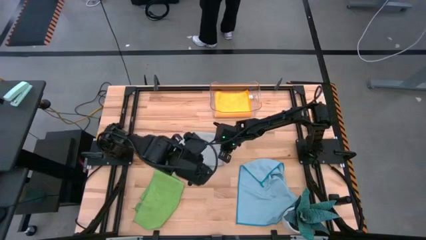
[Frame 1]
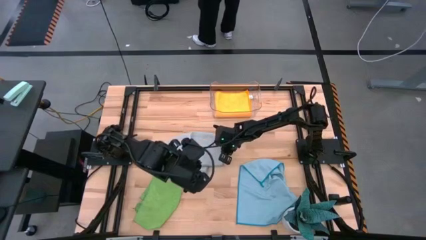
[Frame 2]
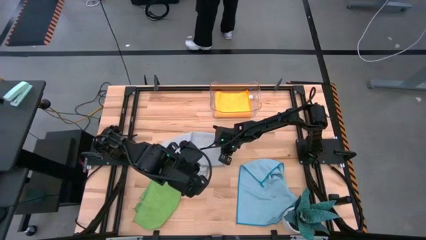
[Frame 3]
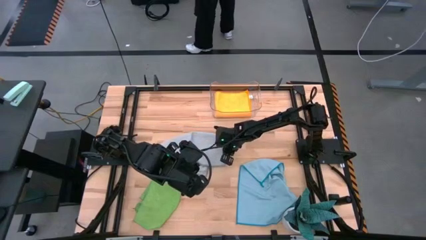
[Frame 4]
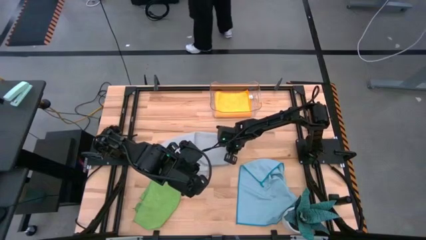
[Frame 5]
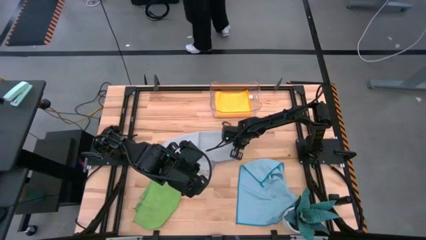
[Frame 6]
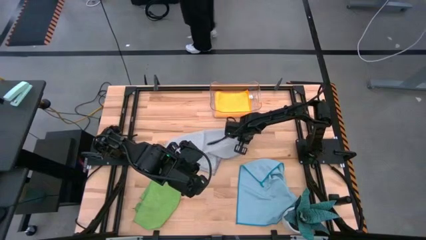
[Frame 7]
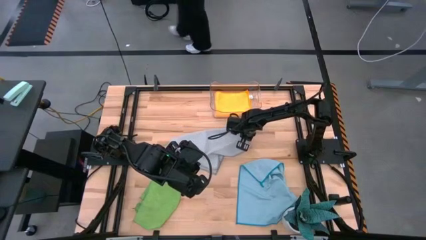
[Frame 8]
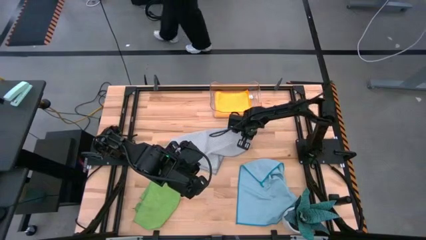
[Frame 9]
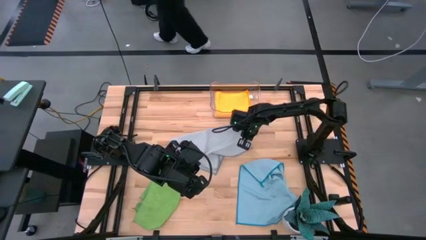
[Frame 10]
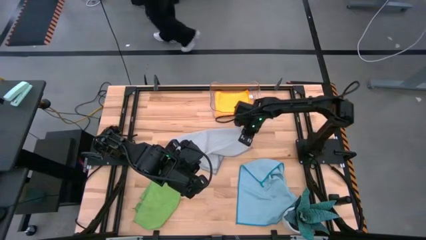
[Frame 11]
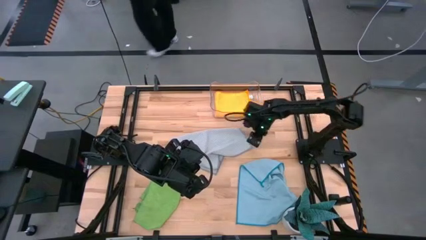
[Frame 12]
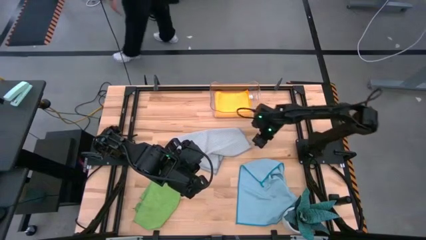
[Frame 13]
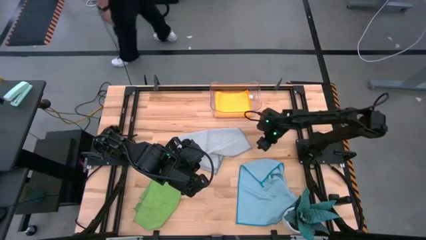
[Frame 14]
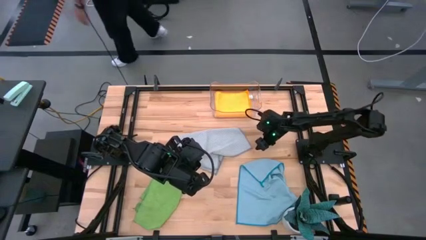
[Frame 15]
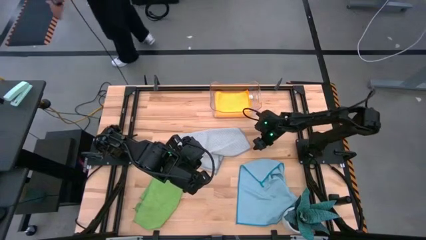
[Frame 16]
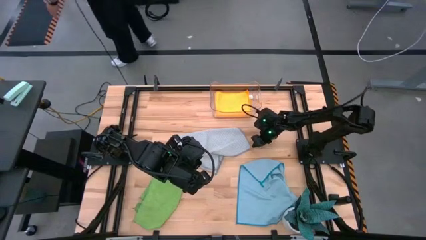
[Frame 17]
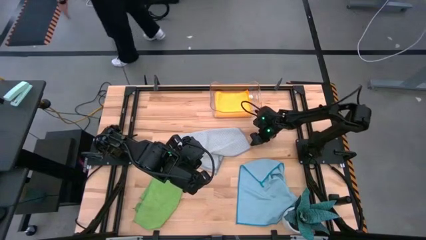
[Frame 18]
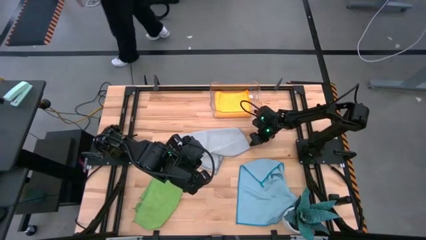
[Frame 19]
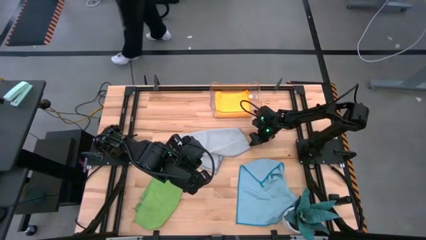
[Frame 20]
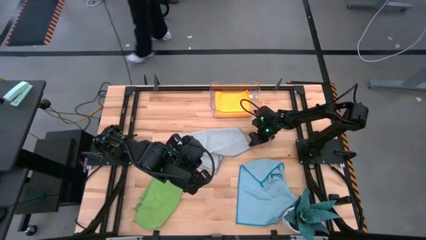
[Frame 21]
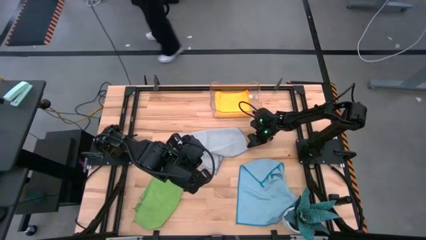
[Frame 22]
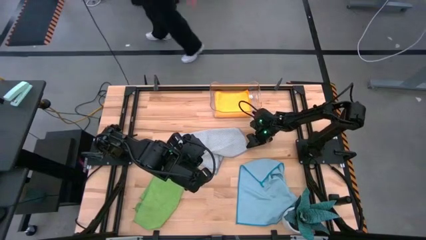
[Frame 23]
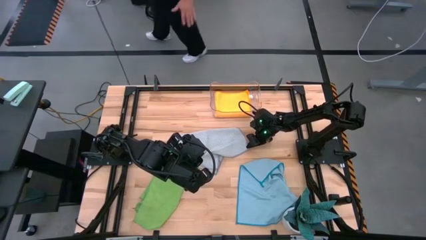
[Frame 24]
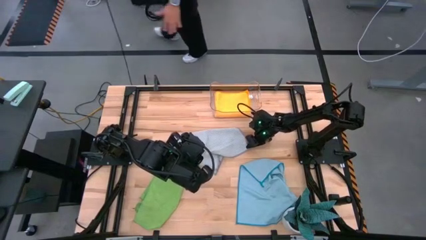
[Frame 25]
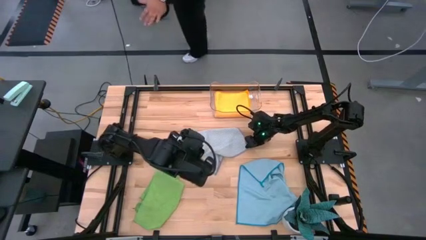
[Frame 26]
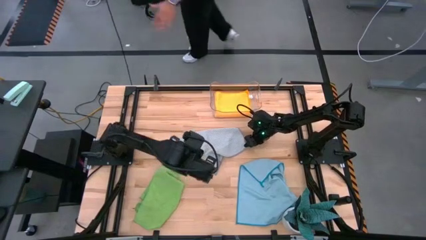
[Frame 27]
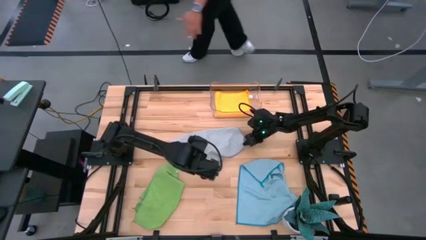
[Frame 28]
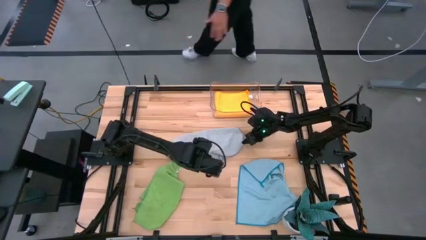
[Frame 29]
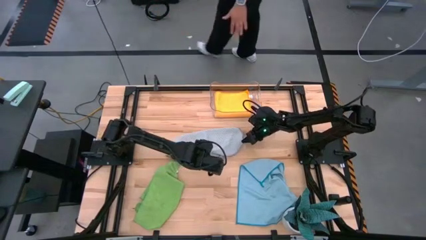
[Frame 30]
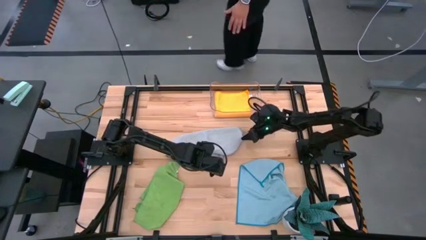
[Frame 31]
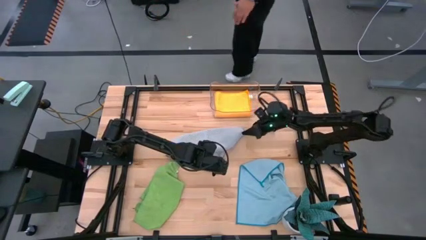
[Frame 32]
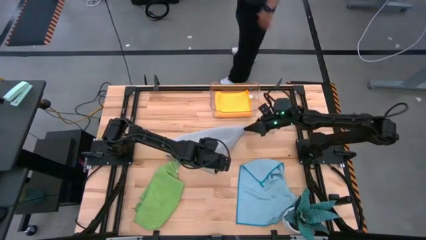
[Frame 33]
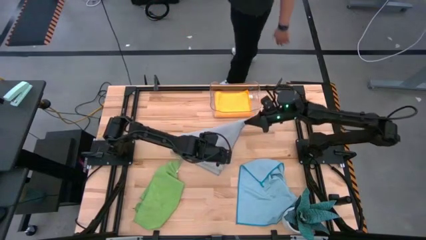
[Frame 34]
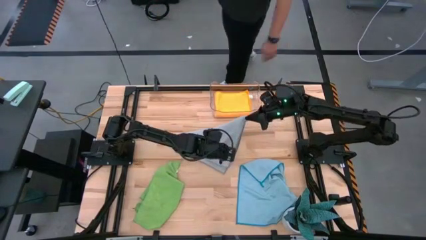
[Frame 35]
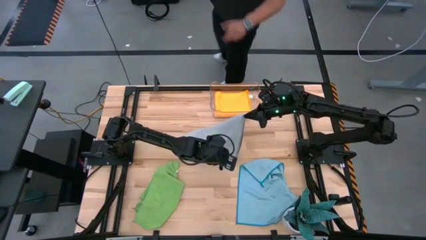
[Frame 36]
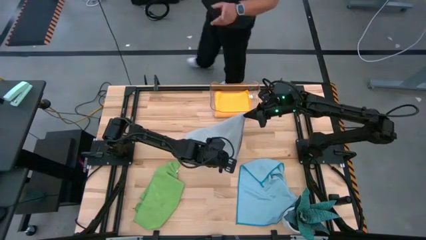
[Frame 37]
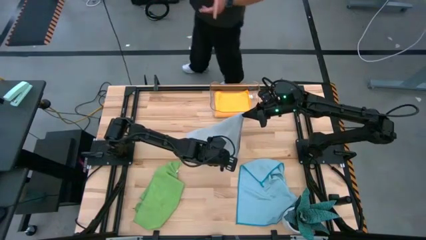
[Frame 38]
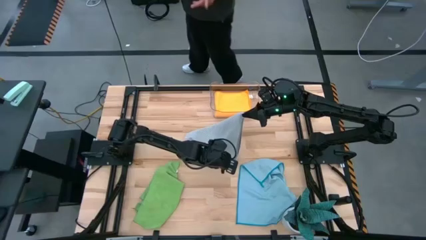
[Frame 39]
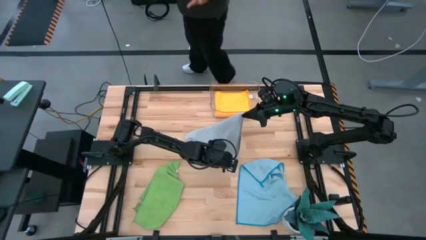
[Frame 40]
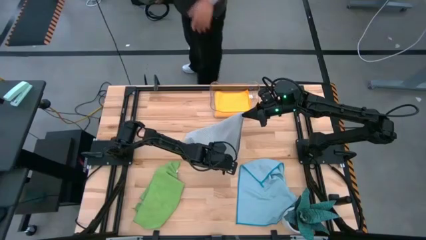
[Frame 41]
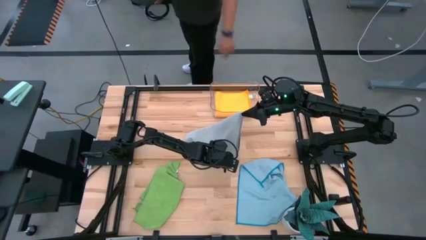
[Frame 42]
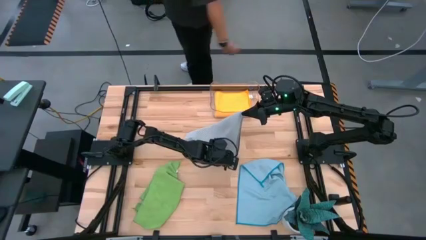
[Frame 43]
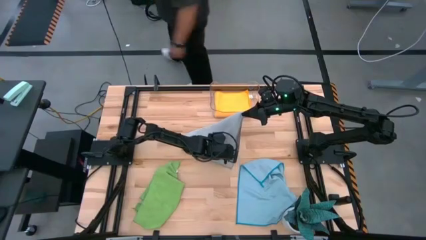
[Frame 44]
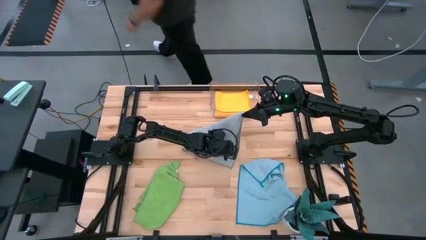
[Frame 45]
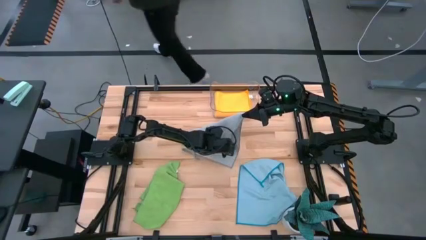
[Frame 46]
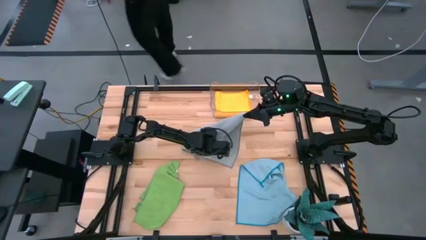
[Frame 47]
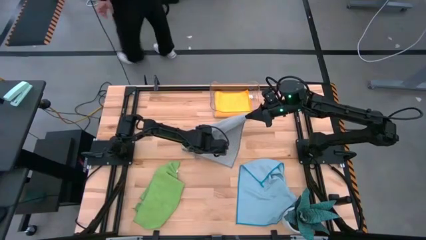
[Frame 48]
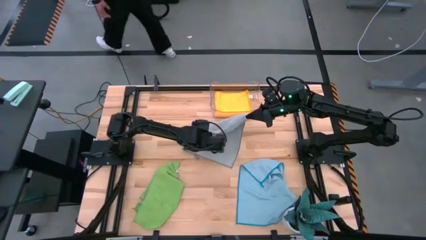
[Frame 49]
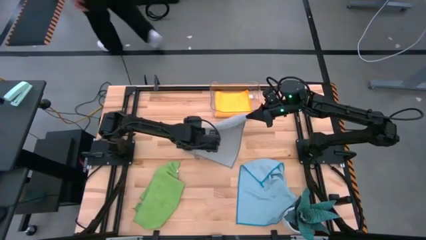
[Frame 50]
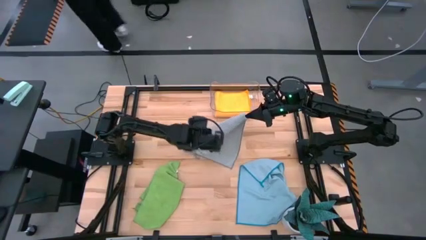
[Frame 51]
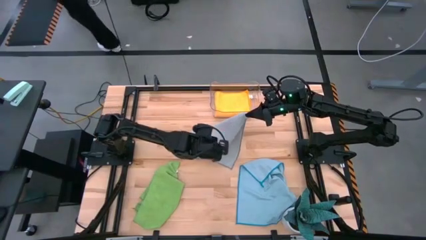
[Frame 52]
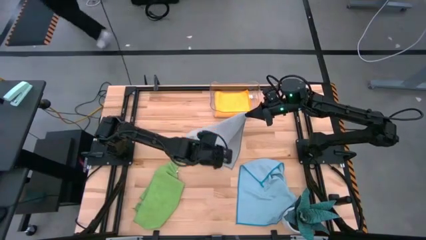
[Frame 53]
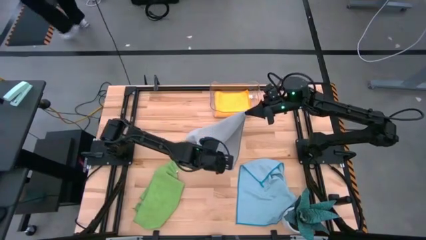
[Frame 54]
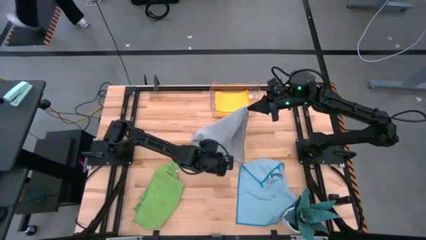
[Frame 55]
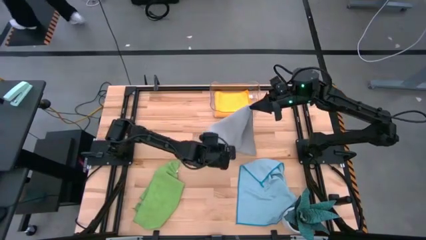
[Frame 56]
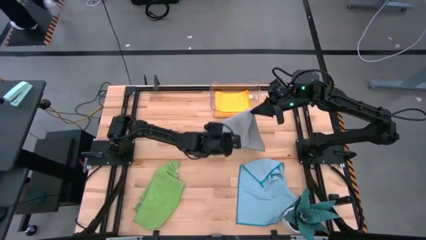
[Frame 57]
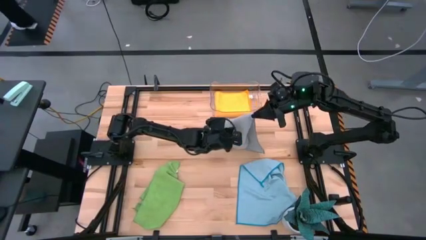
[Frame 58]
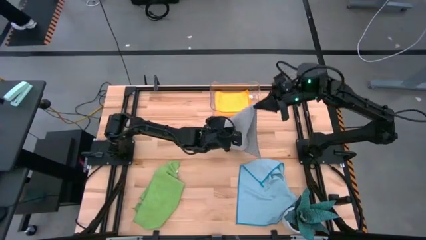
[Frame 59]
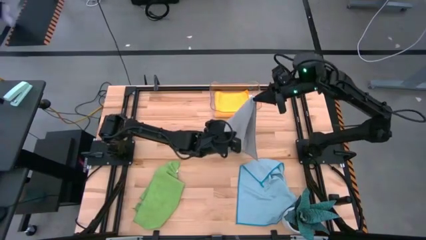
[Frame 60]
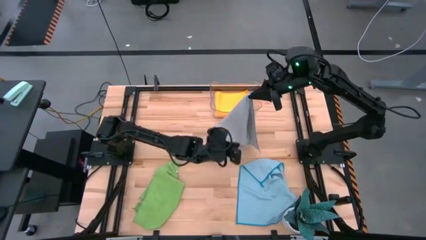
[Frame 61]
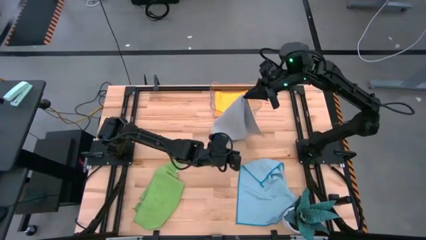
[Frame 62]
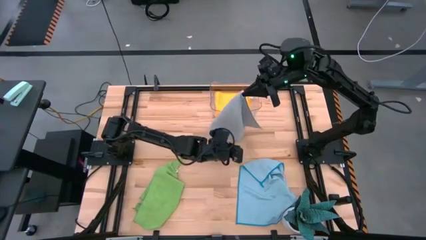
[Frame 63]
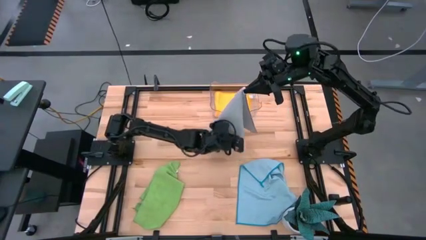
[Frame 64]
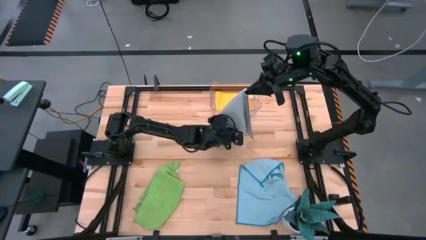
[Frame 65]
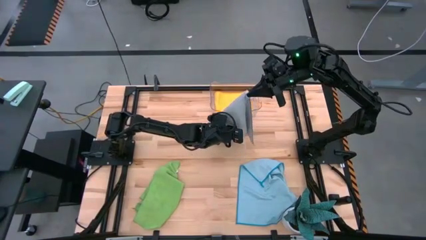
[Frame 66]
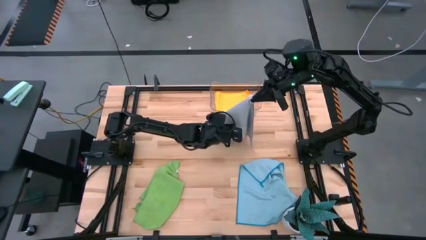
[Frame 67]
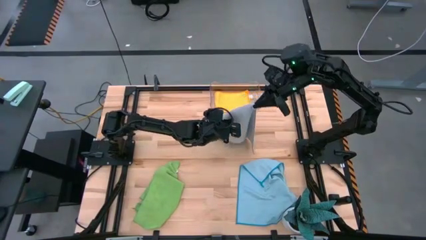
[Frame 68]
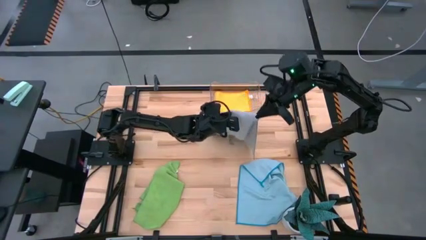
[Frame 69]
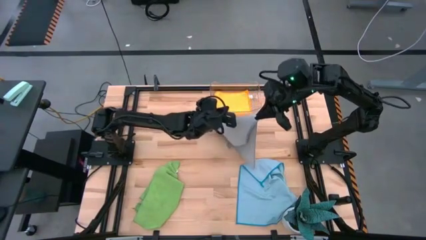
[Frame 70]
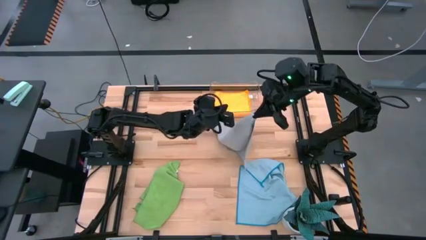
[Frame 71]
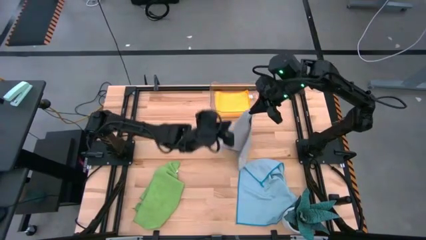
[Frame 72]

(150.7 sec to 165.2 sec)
Task: Fold microfiber towels
Fold the gray microfiber cloth

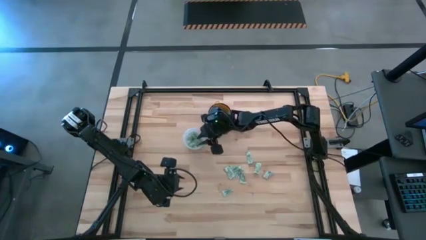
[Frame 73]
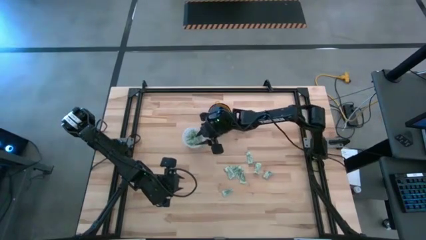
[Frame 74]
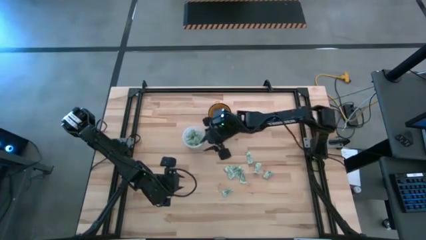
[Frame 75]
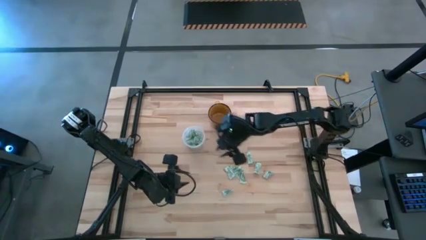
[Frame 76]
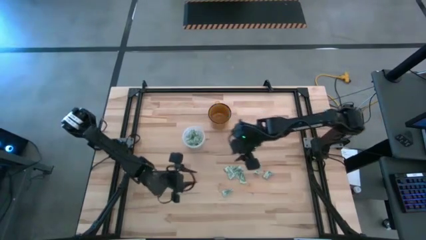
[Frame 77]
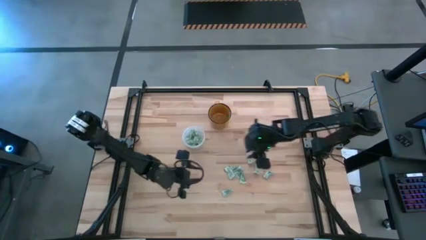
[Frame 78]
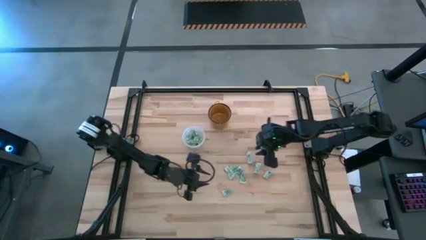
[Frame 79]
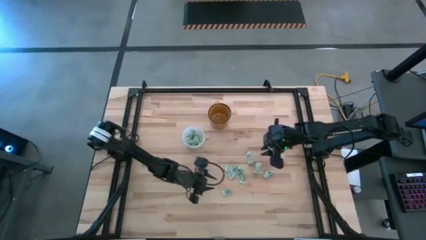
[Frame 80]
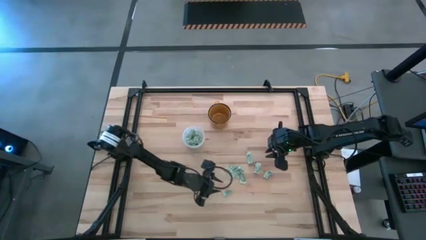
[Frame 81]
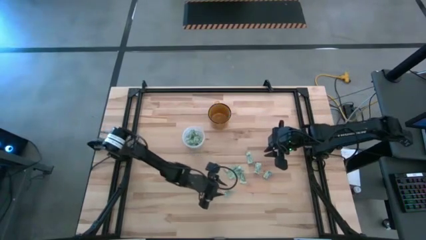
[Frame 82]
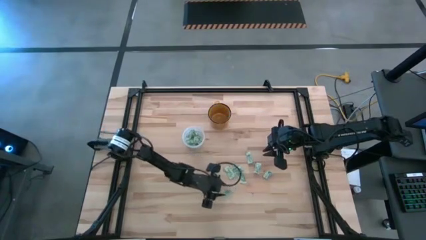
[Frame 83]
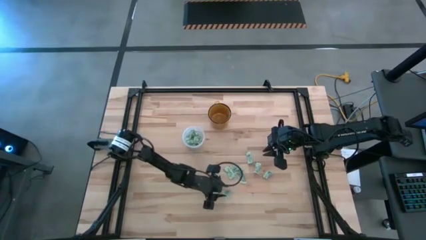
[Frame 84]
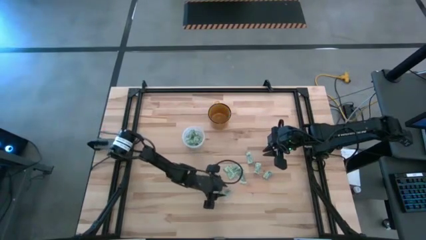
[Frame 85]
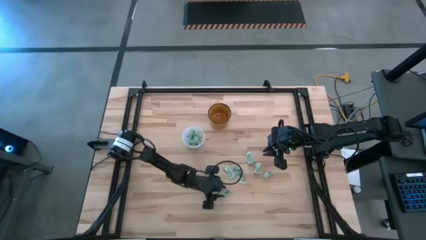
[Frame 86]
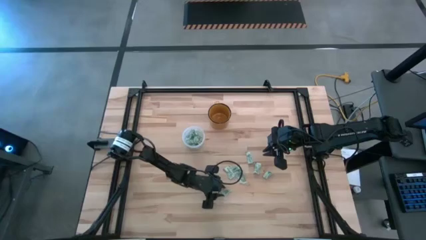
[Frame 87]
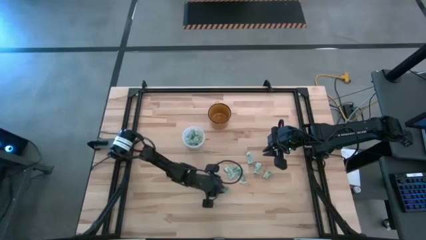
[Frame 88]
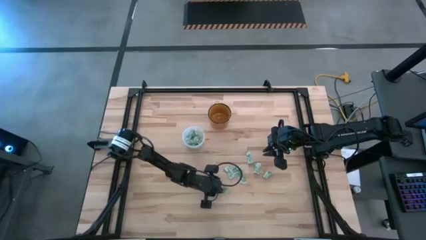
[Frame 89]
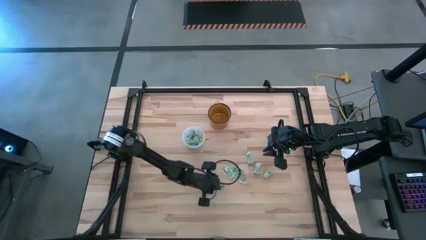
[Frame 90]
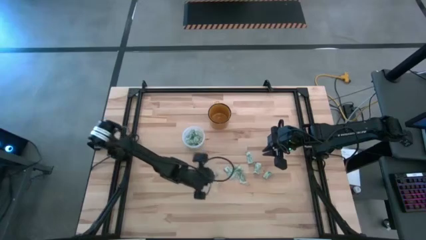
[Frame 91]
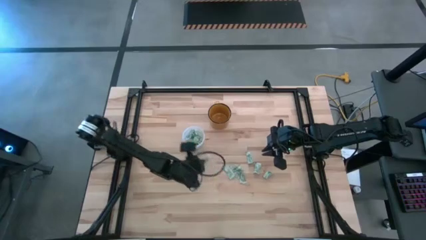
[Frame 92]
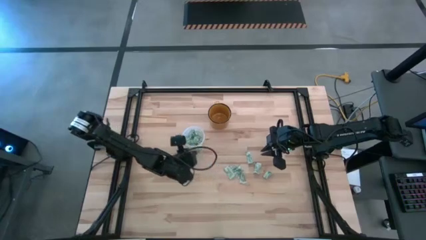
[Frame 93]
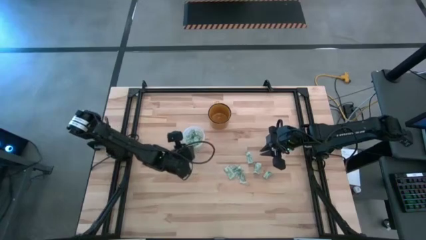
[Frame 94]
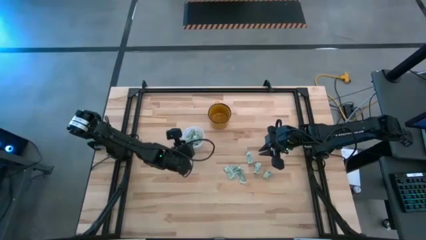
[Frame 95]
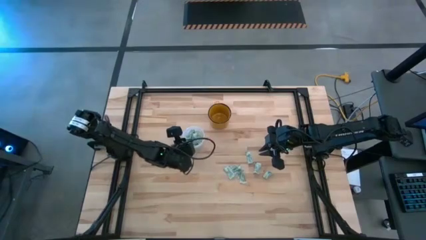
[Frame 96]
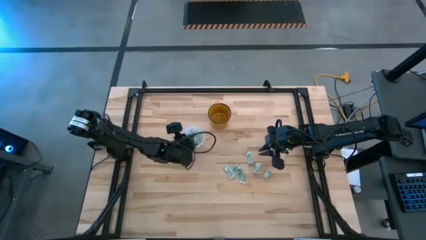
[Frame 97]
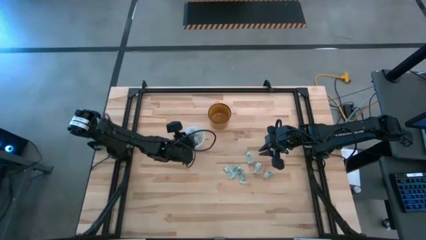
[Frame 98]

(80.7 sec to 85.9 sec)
Task: Pick and place Stevia / Truvia into bins
Put the stevia packet into the transparent bin
